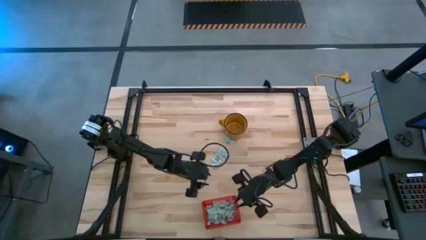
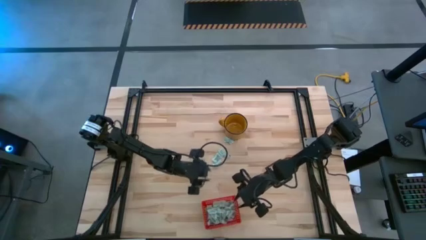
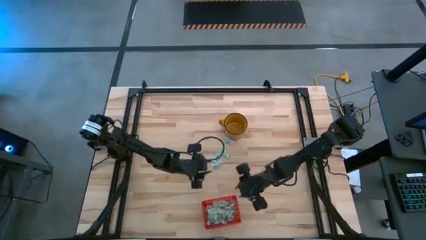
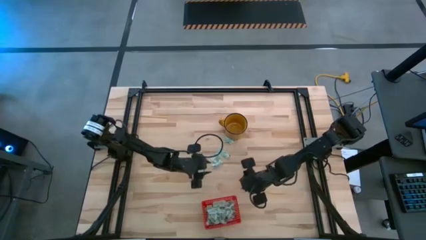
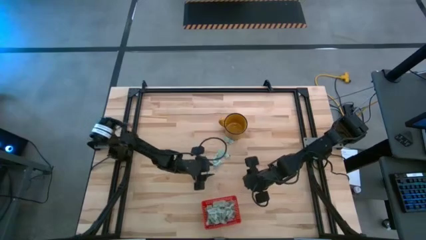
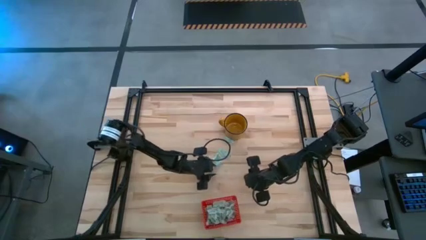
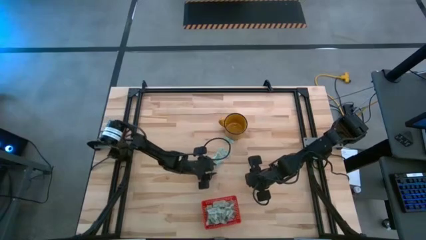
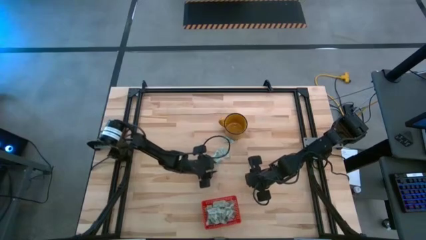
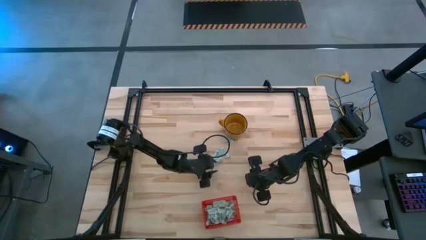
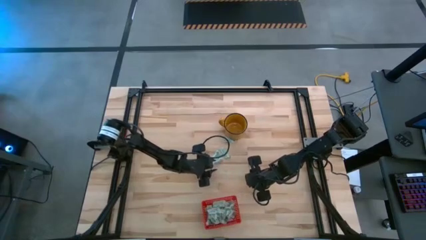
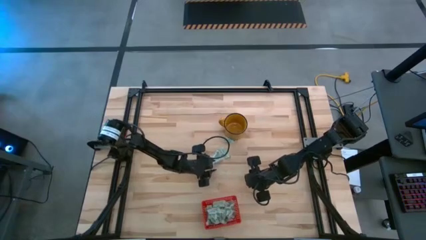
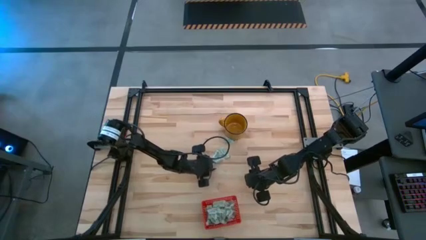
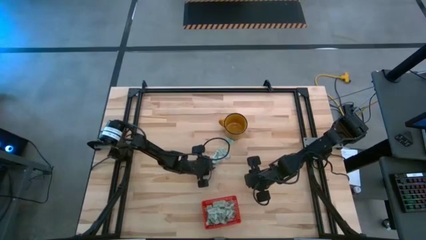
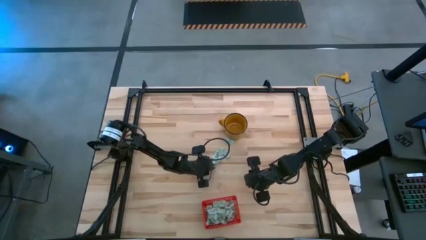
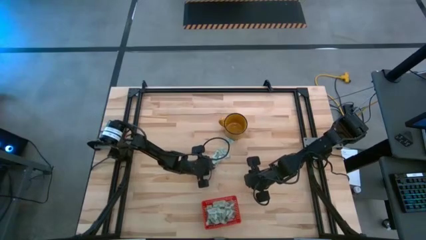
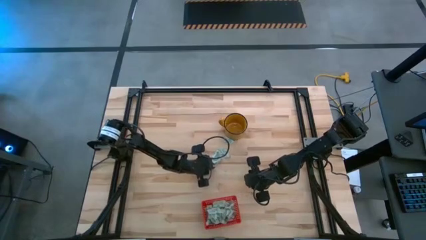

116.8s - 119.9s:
Task: Pick and place Stevia / Truvia into bins
Put the stevia packet into the bin

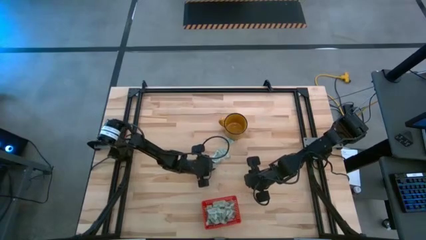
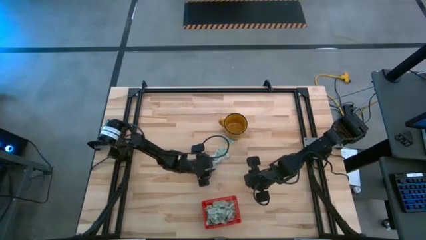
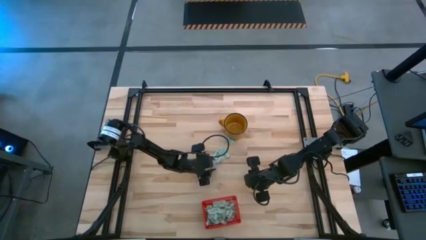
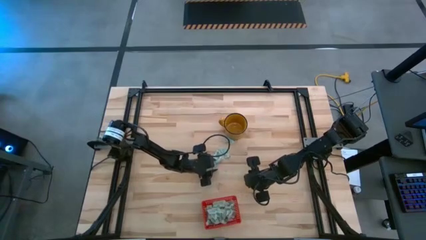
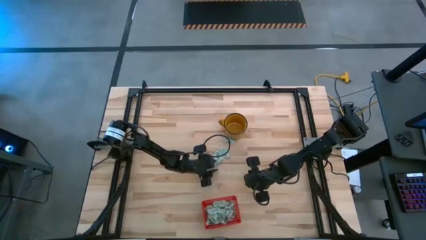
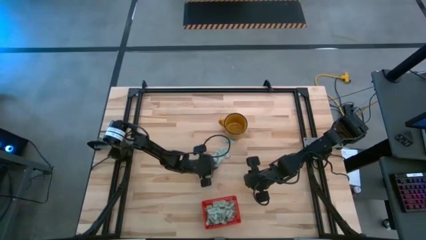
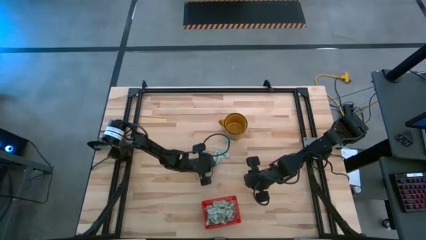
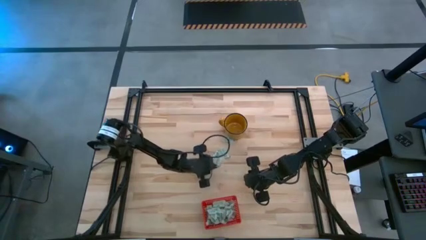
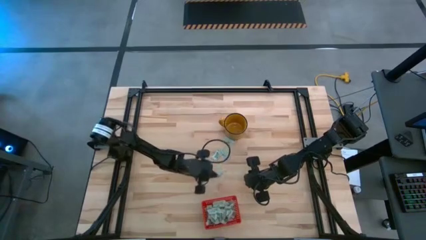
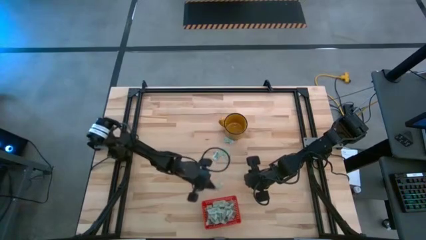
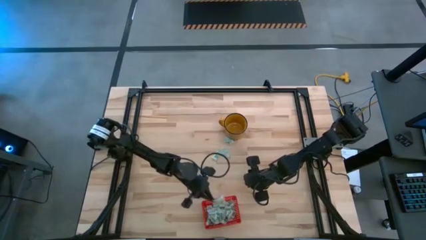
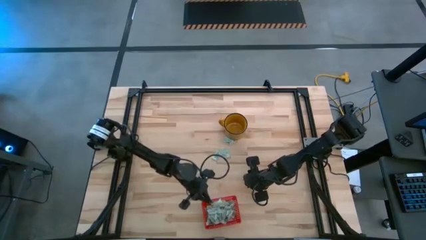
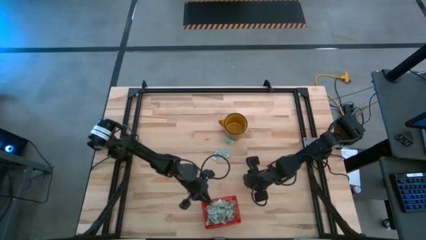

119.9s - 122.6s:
Put the stevia packet into the bin

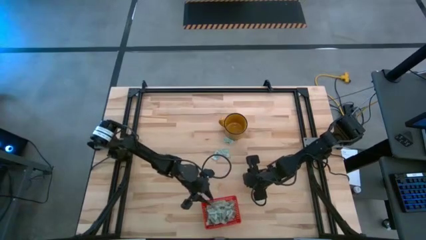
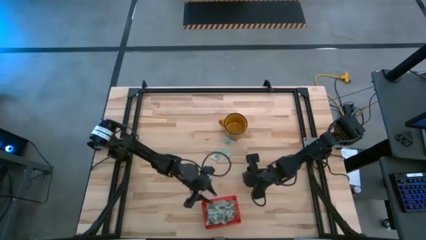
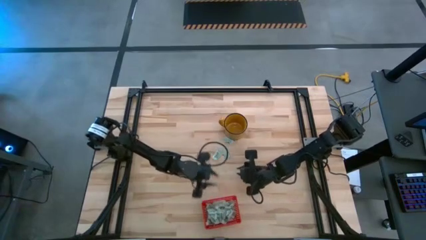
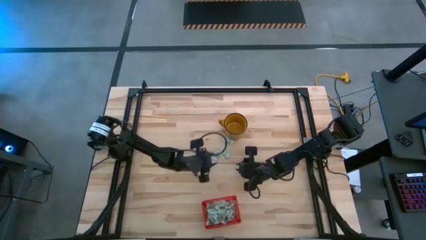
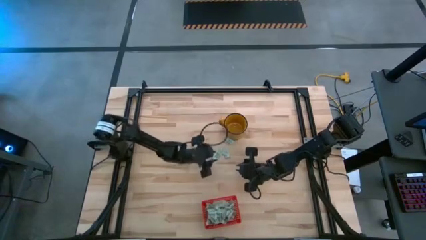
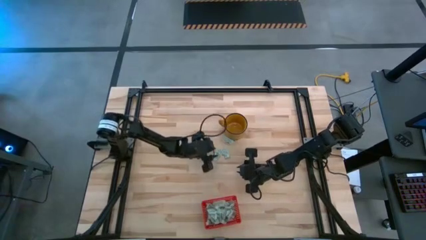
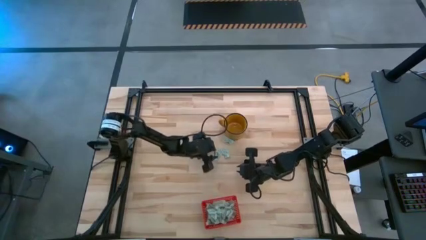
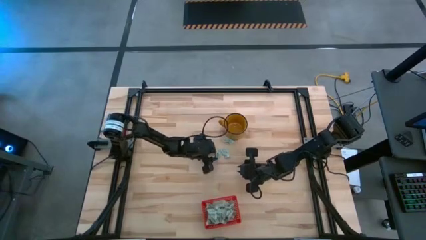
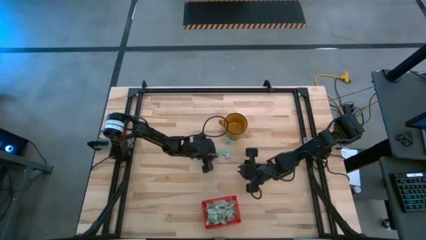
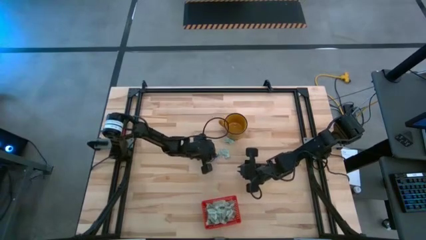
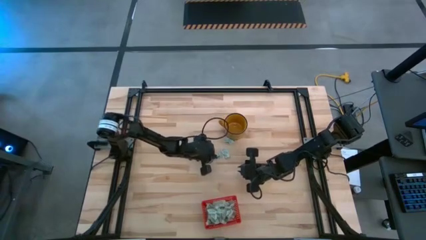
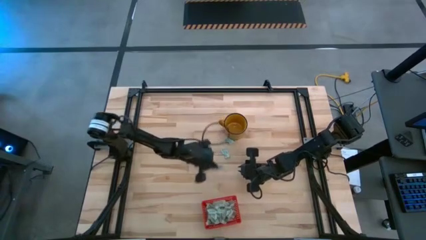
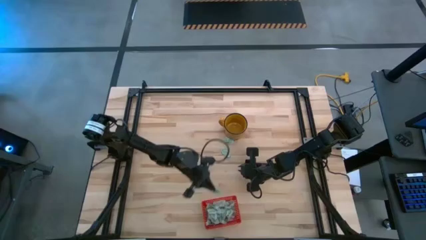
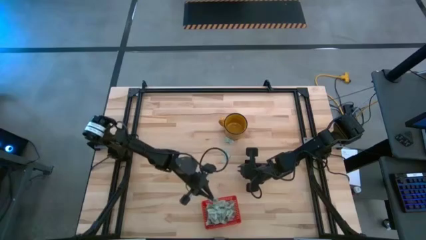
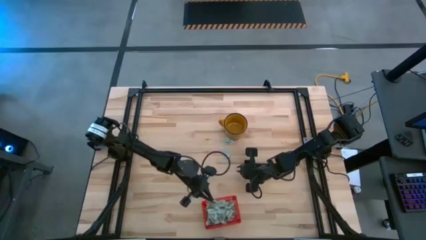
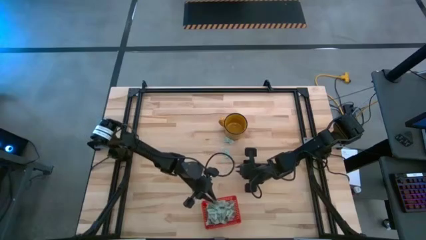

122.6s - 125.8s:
Put the left stevia packet into the bin

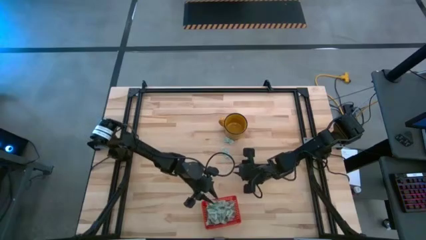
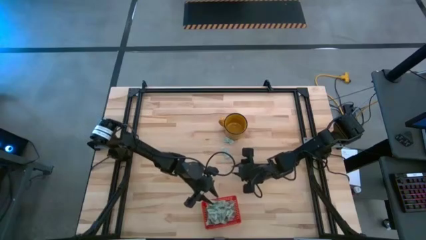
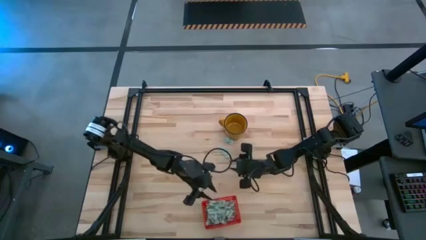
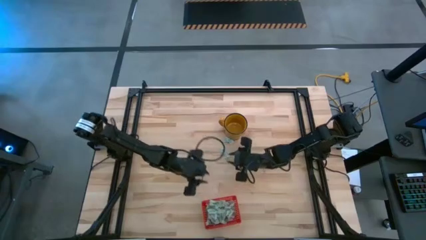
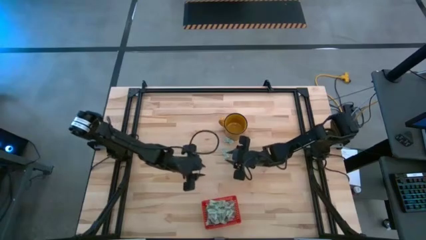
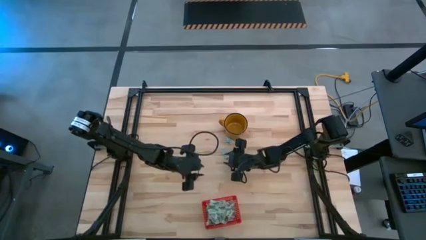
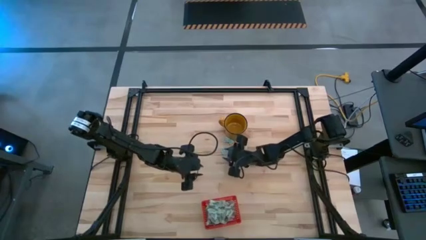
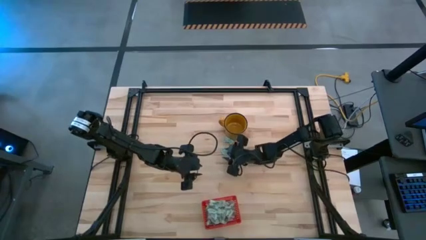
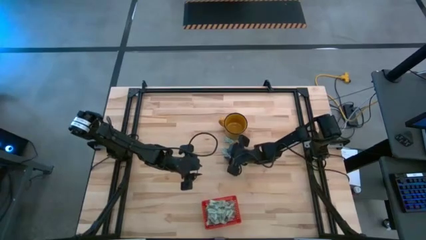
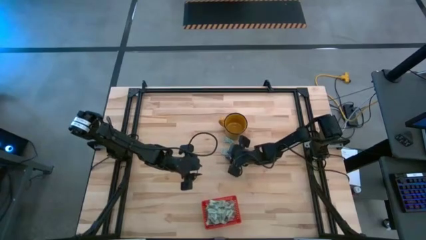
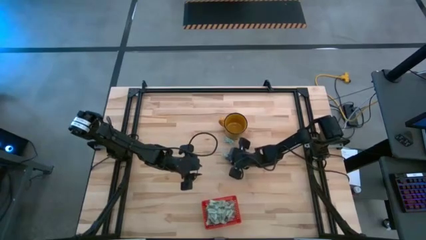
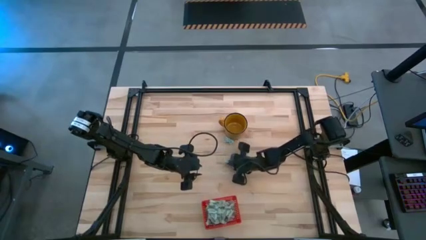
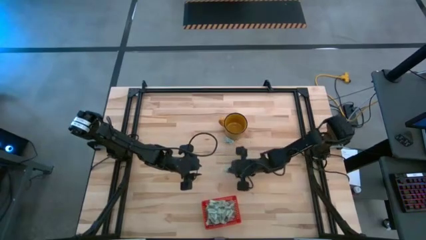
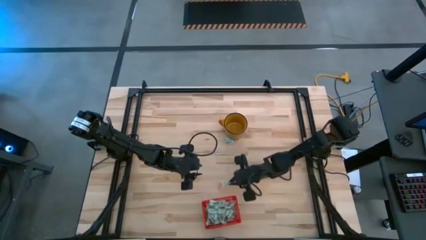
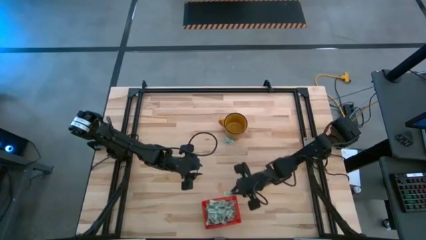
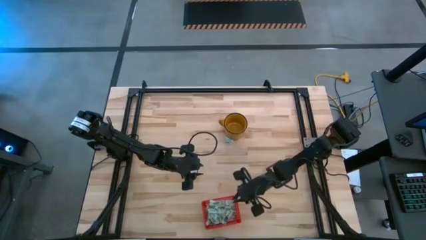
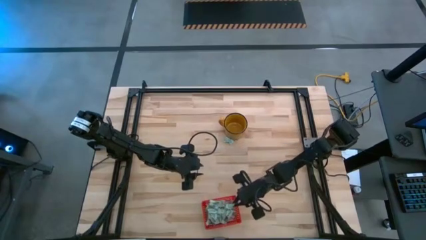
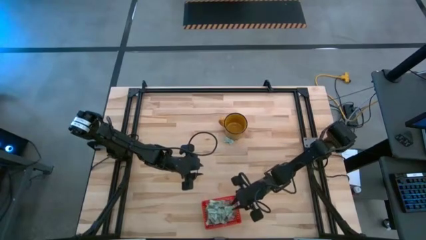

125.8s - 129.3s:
Put the bottom stevia packet into the bin

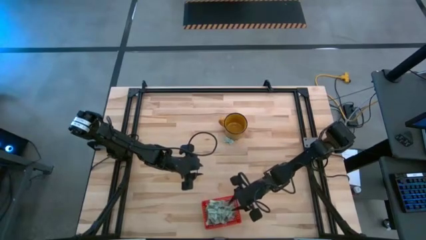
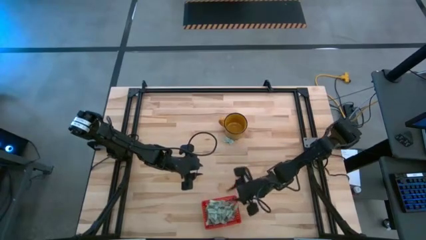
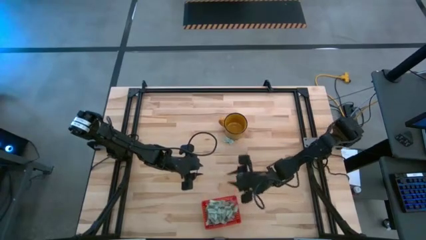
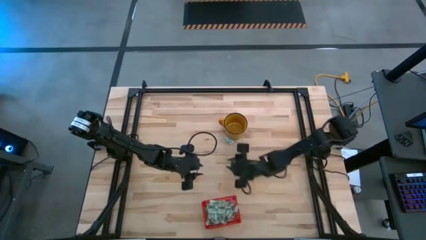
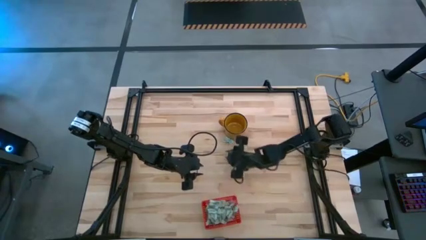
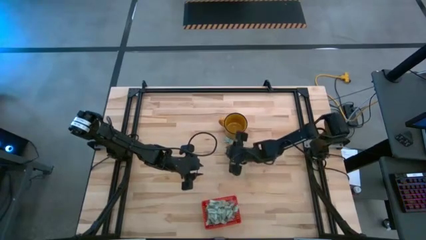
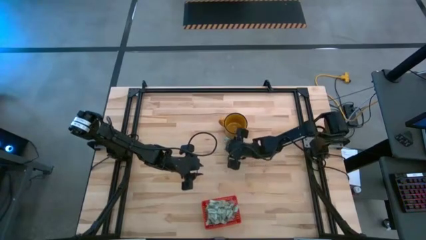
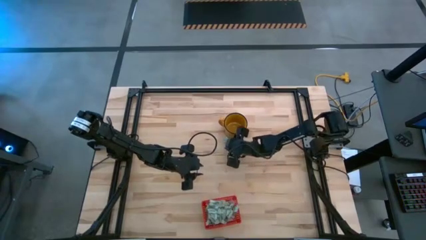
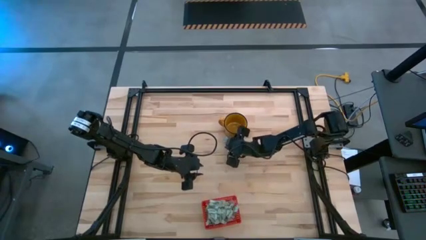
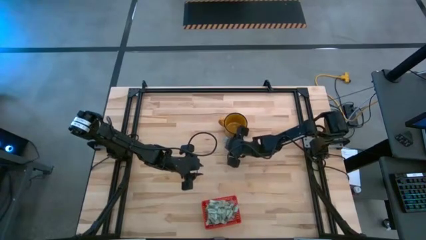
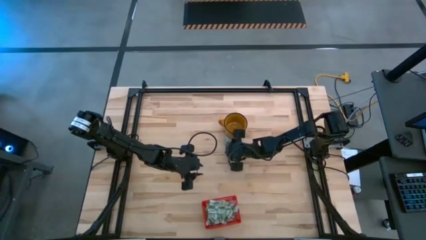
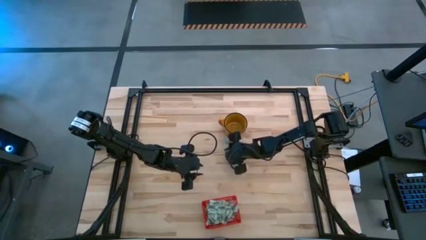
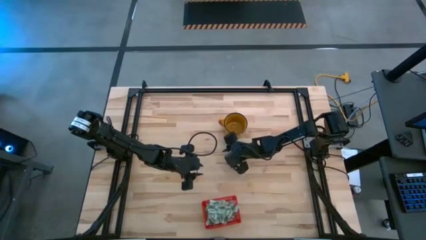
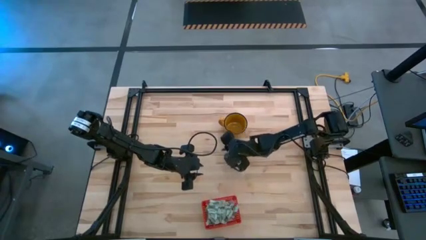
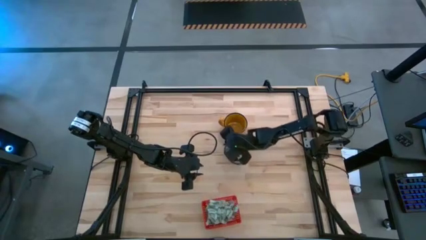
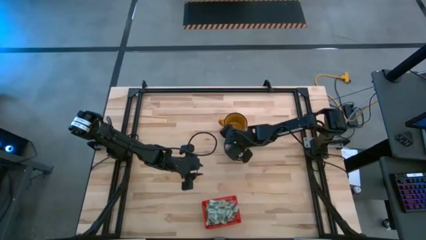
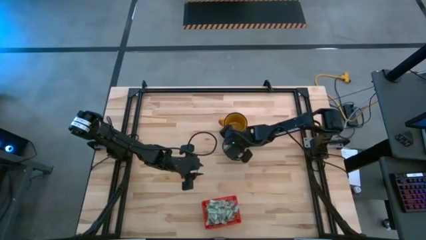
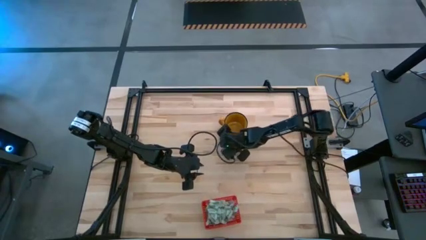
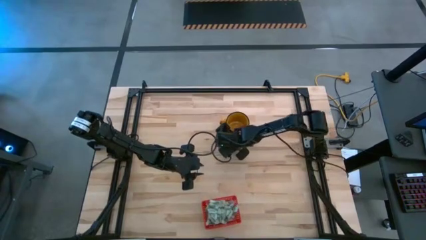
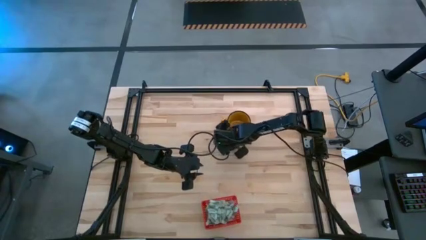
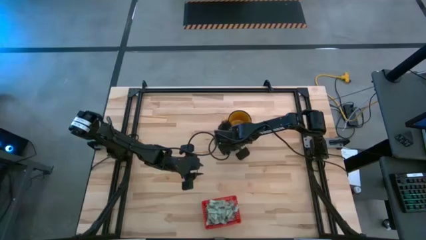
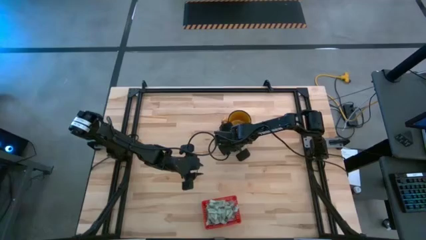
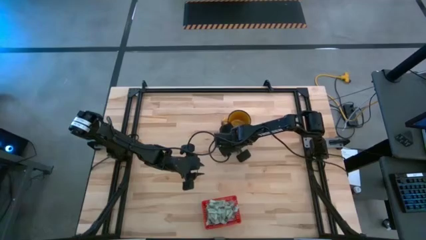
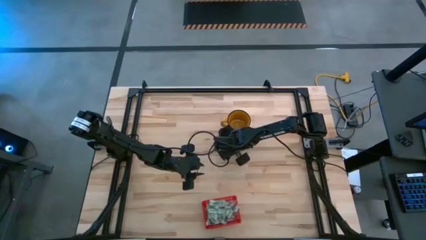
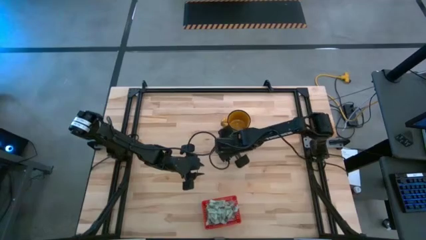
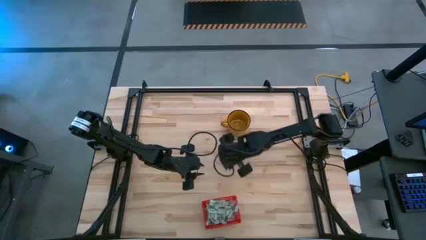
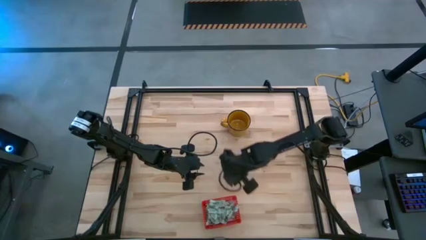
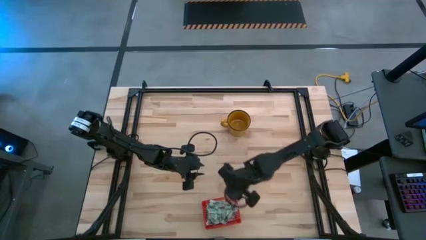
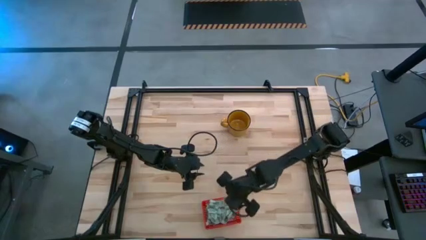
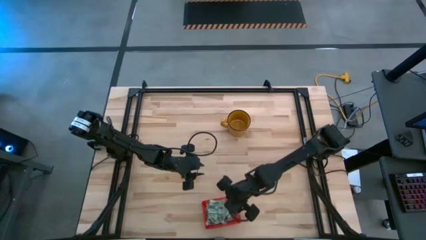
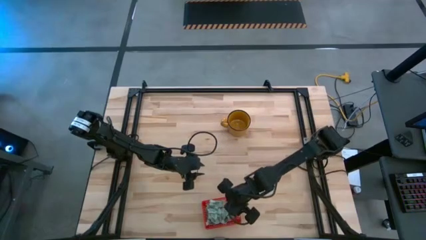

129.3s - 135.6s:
Put the stevia packet into the bin
